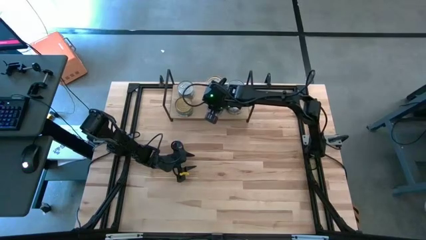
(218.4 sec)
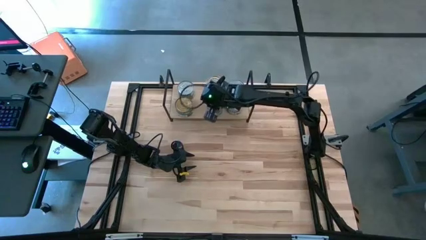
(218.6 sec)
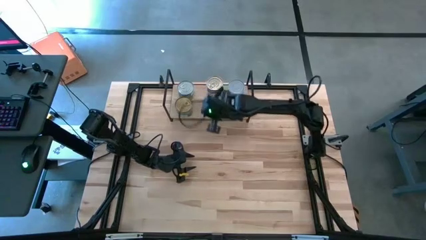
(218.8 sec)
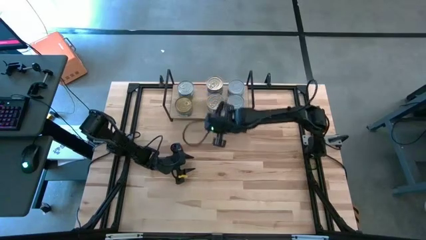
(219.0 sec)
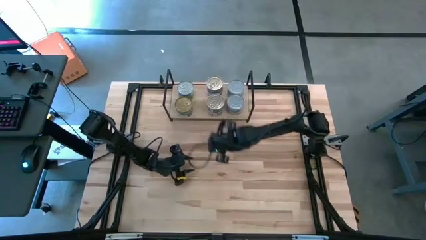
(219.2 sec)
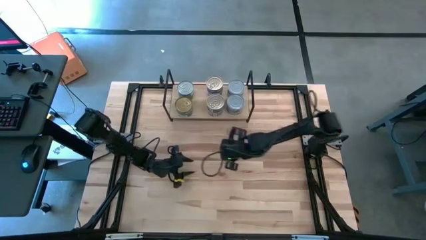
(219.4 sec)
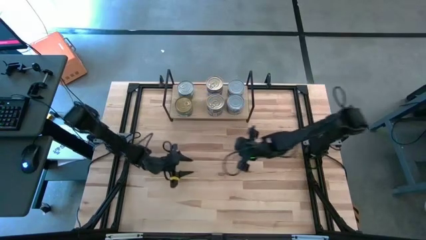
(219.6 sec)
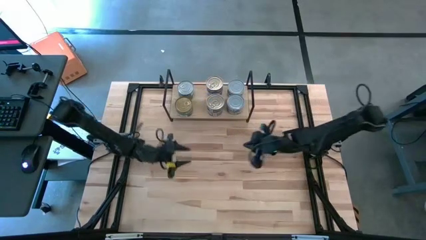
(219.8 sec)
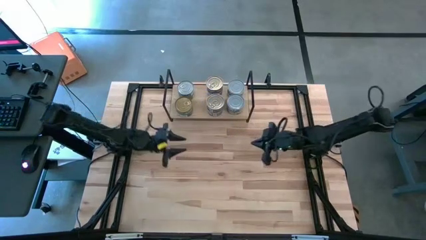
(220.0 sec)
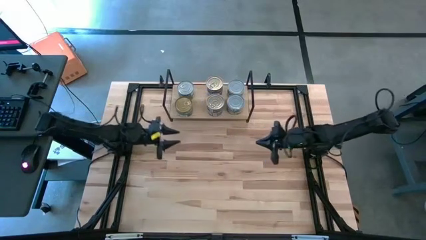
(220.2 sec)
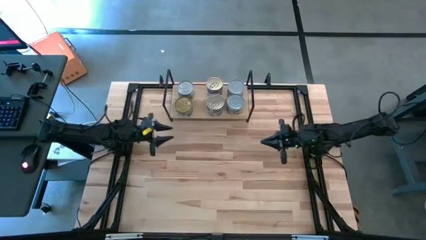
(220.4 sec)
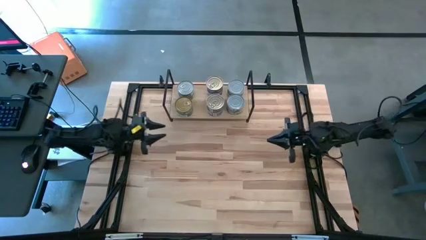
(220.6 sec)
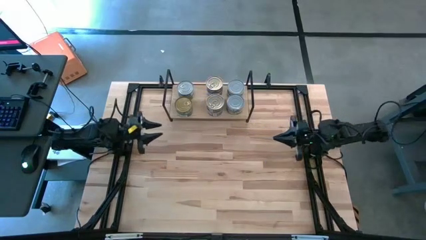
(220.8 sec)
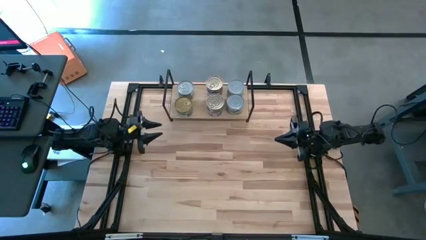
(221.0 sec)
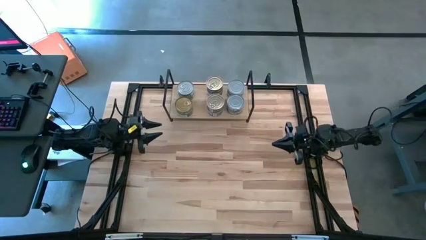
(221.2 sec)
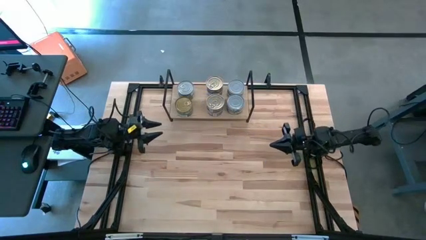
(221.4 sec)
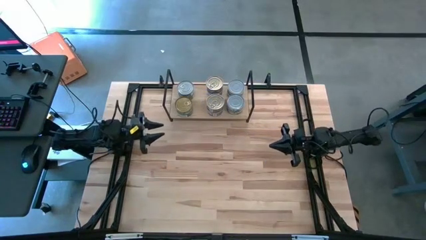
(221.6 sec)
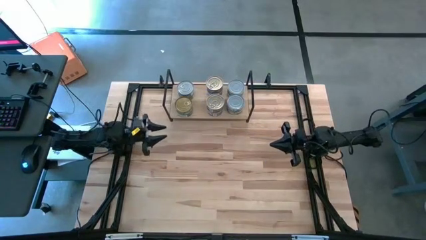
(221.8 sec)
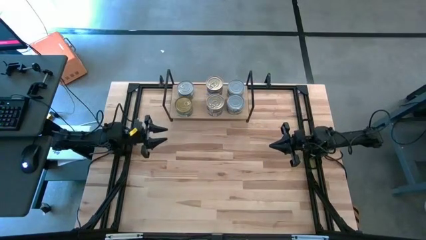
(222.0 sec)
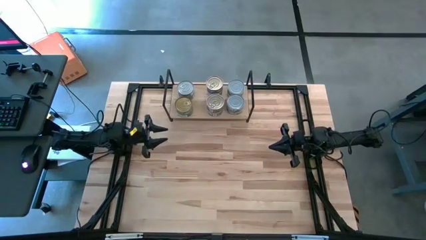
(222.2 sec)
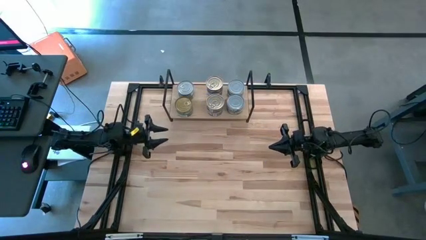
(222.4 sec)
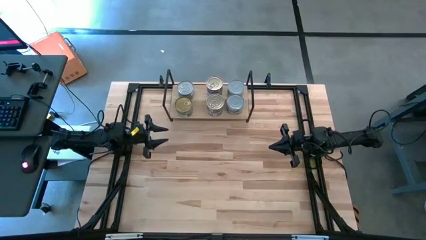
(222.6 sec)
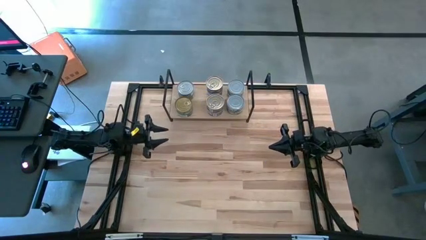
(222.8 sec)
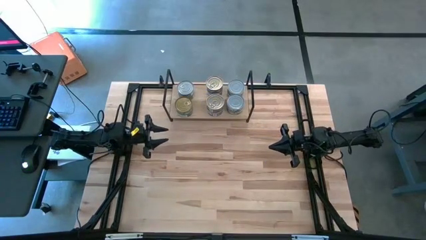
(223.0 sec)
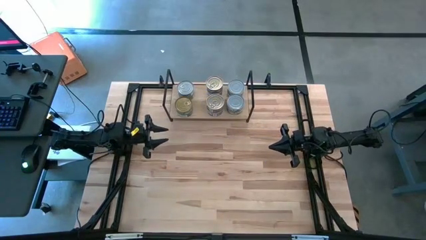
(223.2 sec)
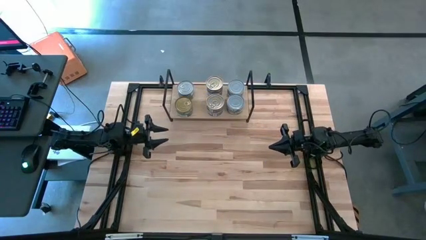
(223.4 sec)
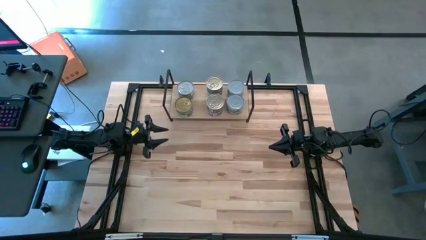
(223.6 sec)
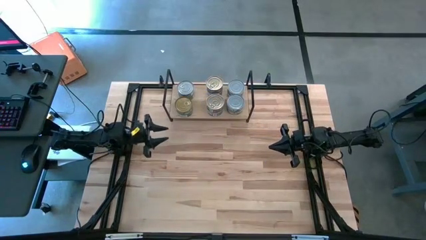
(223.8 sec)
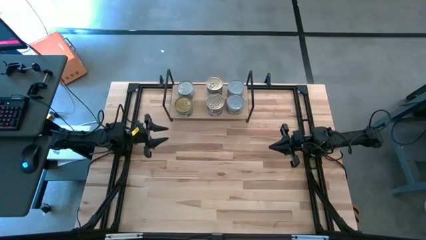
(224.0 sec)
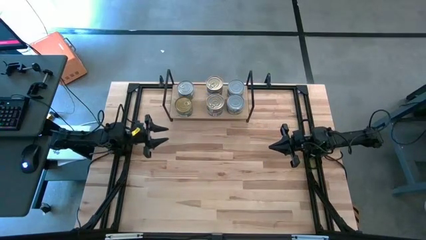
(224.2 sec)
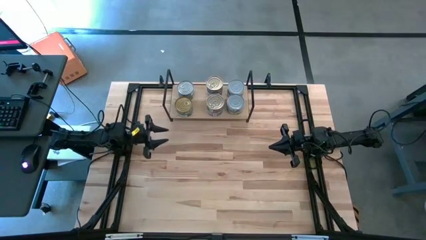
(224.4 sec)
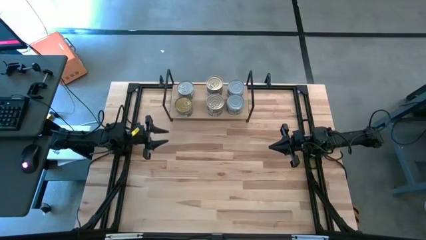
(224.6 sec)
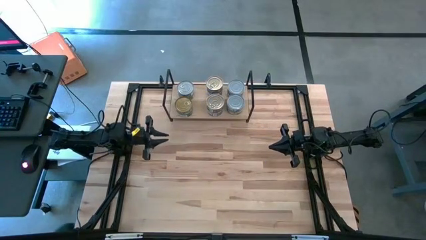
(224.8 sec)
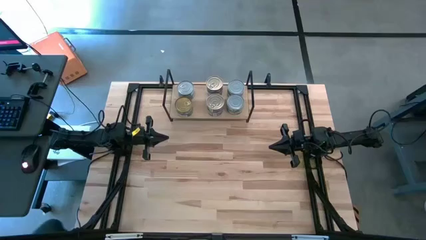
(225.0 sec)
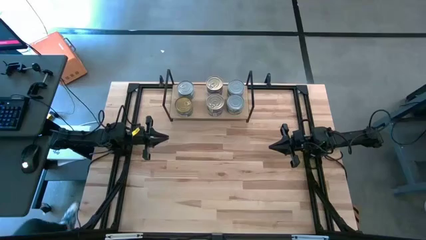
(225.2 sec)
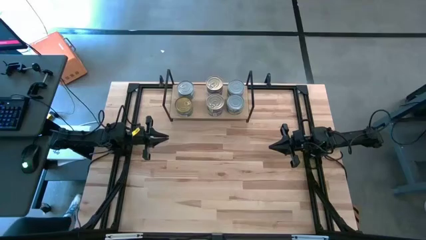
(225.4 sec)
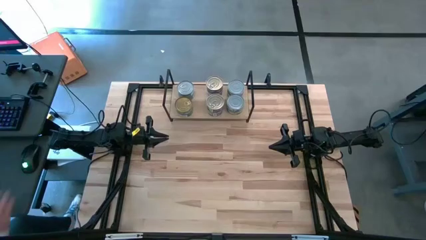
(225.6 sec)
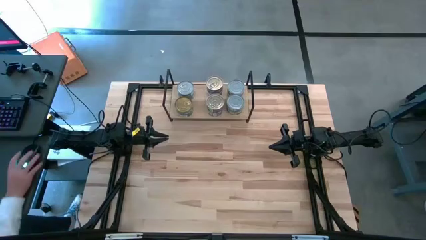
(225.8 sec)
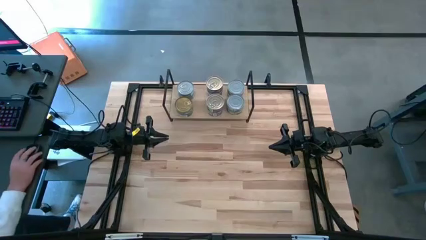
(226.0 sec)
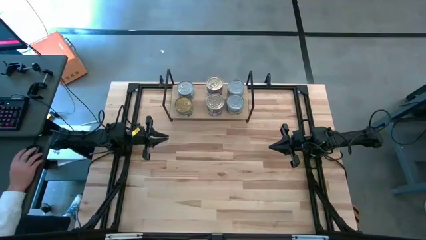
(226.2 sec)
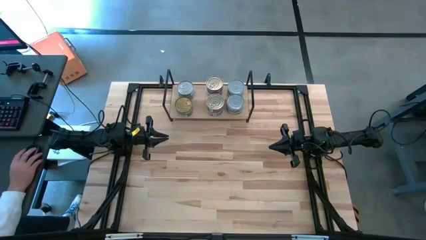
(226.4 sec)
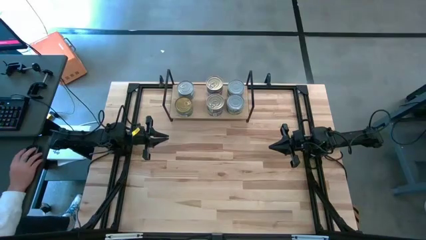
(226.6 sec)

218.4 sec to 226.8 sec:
Task: Stack canned seafood by type on shelf
Return to Home Position
